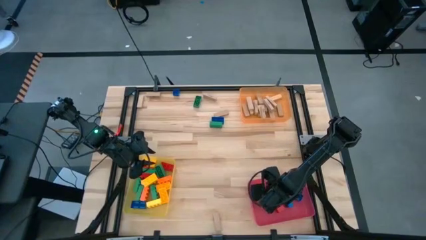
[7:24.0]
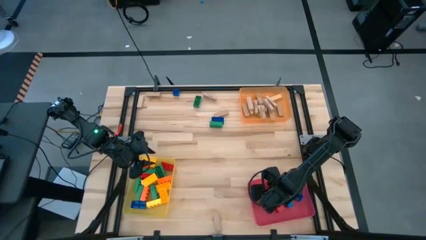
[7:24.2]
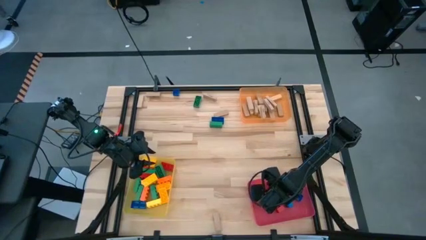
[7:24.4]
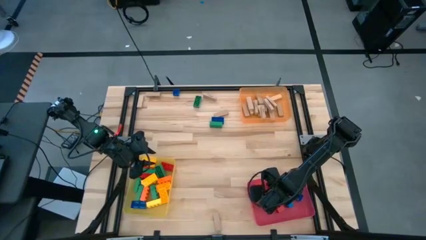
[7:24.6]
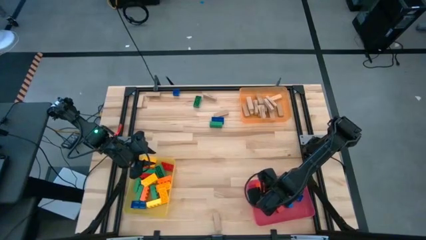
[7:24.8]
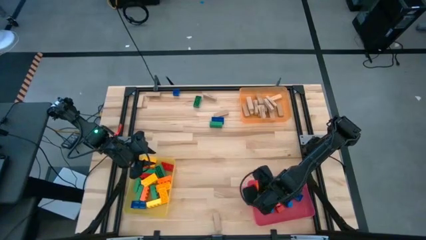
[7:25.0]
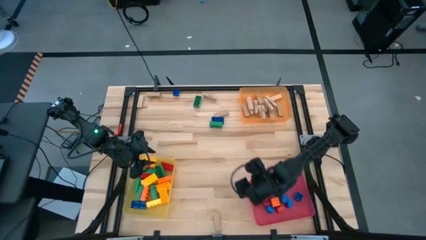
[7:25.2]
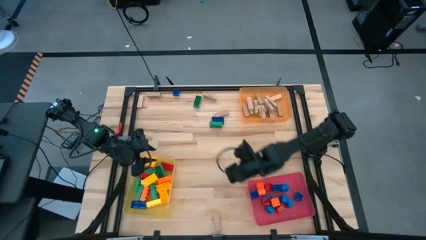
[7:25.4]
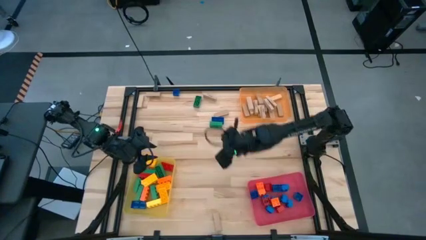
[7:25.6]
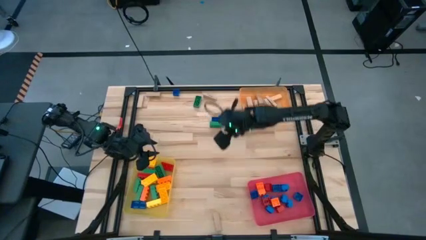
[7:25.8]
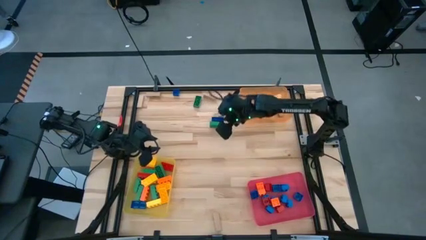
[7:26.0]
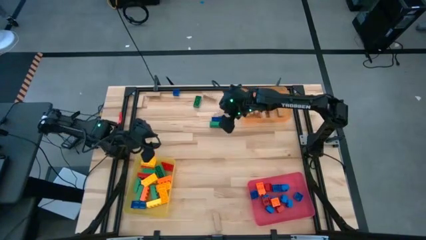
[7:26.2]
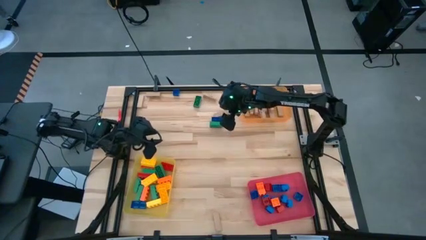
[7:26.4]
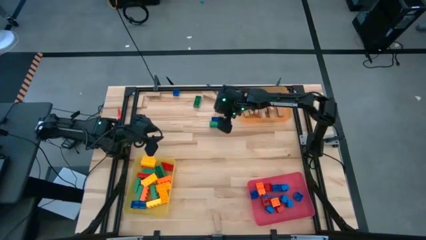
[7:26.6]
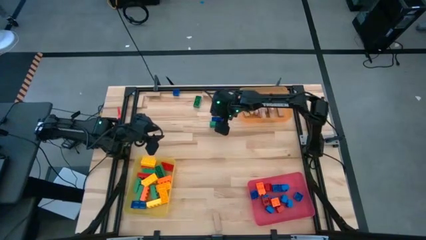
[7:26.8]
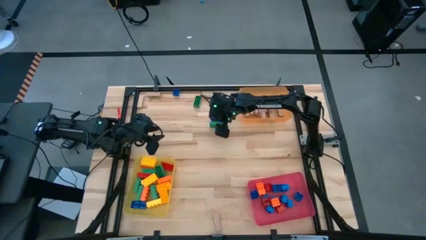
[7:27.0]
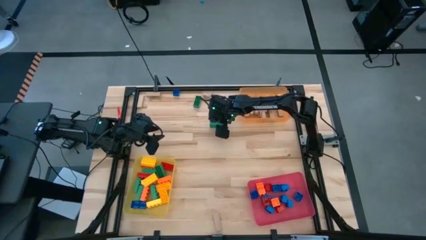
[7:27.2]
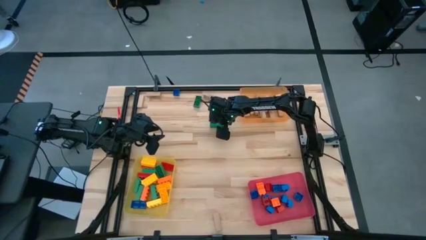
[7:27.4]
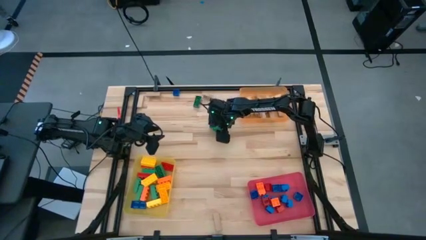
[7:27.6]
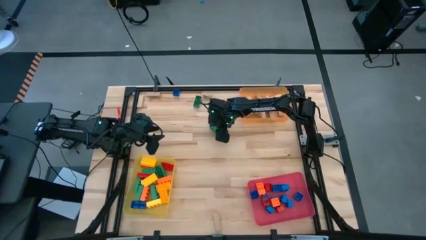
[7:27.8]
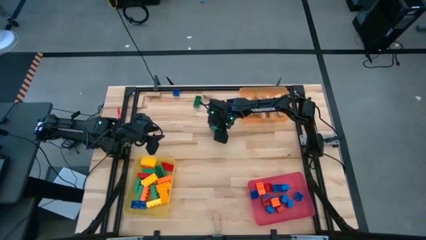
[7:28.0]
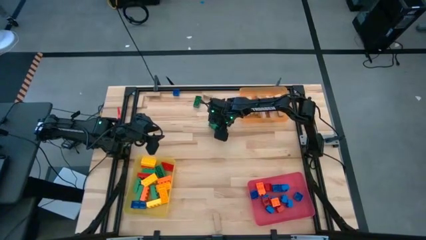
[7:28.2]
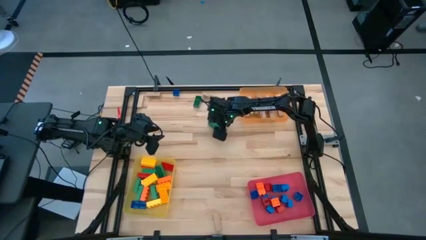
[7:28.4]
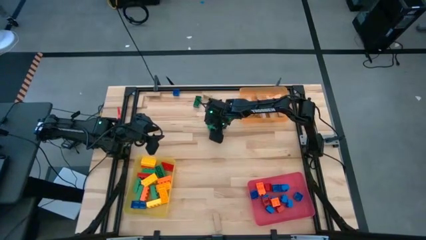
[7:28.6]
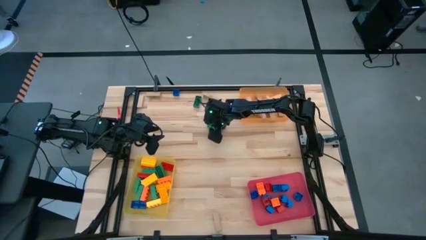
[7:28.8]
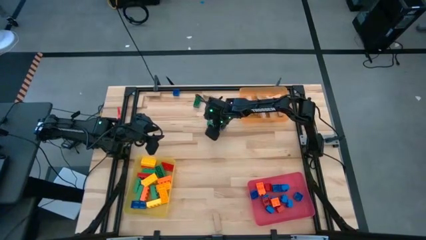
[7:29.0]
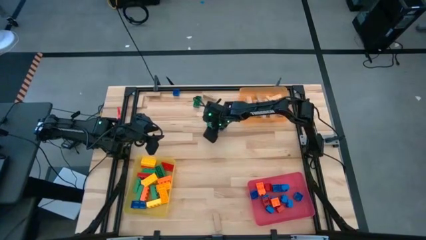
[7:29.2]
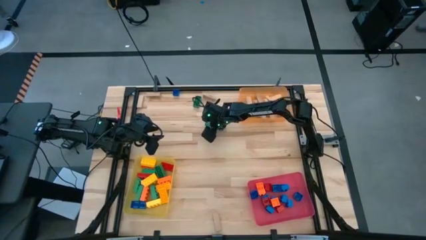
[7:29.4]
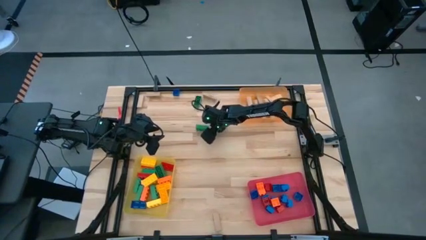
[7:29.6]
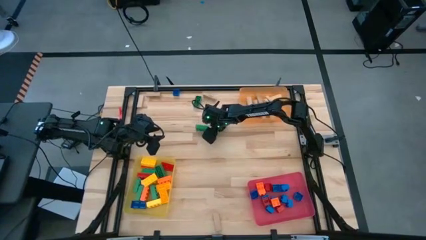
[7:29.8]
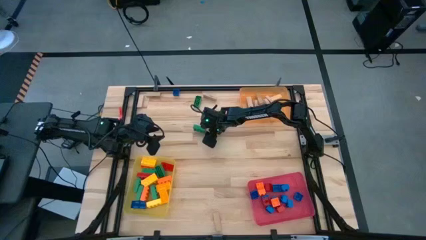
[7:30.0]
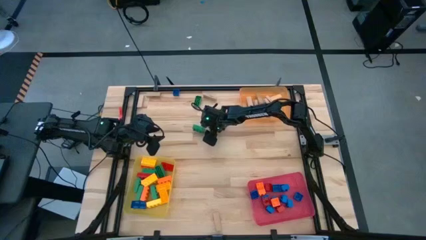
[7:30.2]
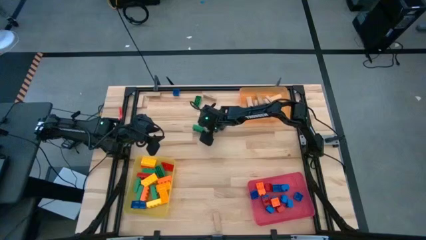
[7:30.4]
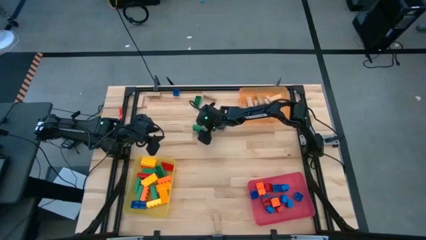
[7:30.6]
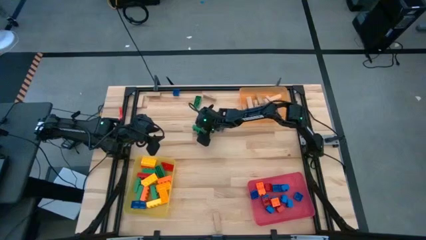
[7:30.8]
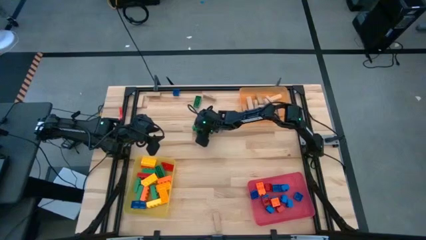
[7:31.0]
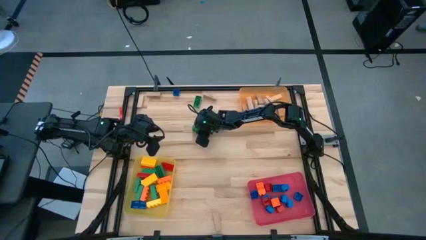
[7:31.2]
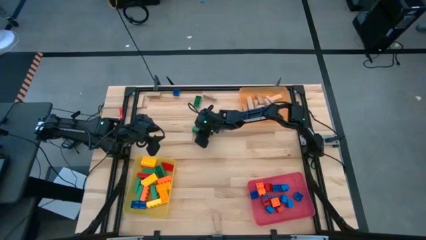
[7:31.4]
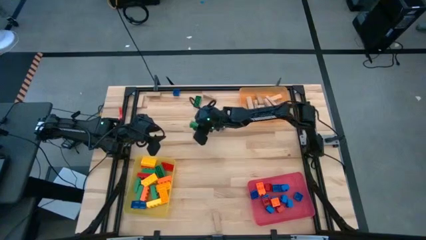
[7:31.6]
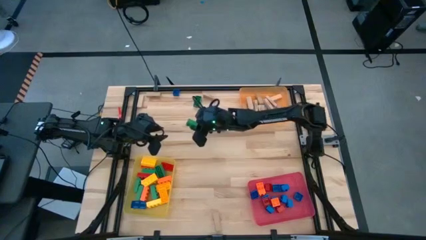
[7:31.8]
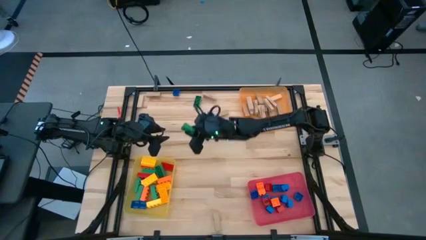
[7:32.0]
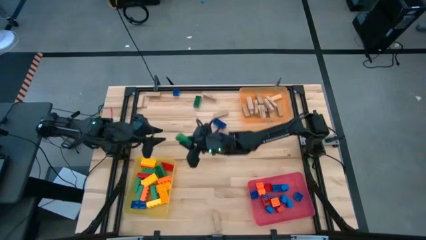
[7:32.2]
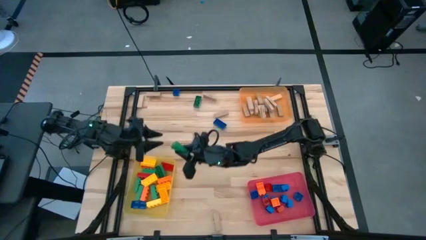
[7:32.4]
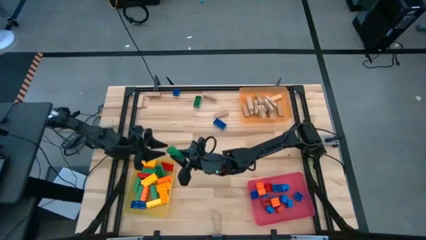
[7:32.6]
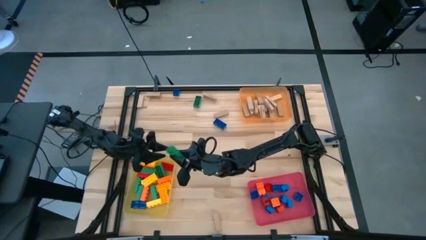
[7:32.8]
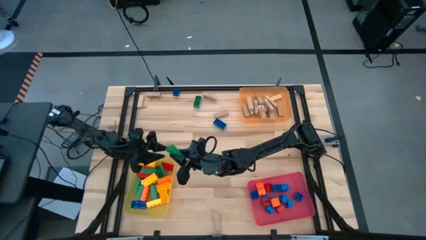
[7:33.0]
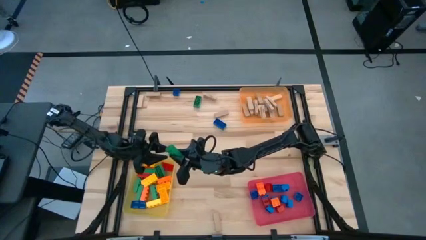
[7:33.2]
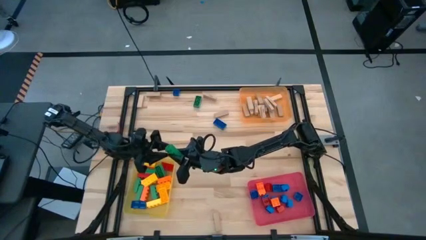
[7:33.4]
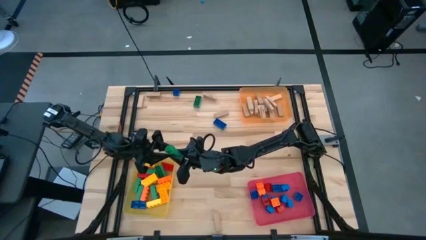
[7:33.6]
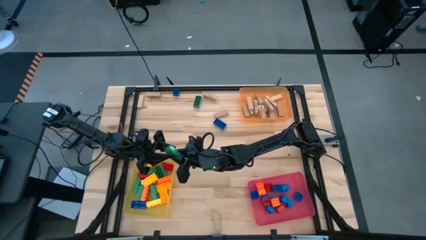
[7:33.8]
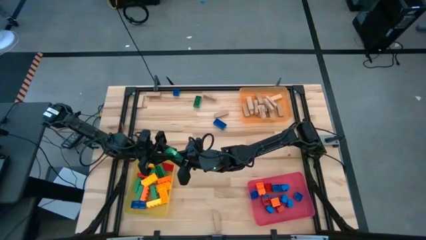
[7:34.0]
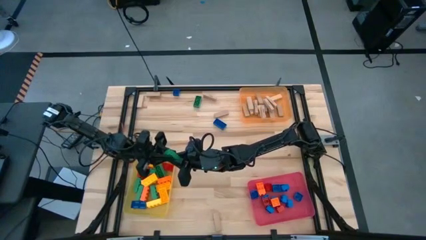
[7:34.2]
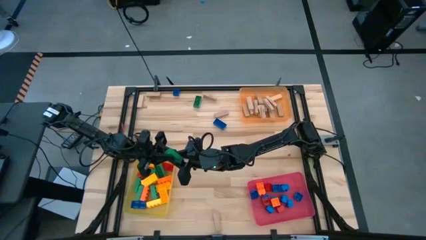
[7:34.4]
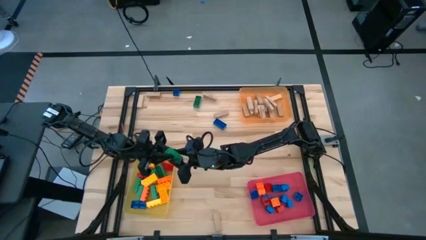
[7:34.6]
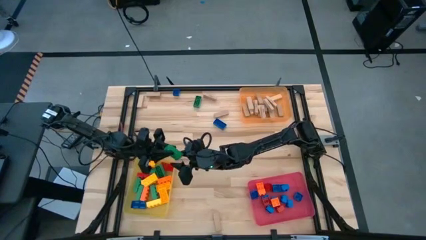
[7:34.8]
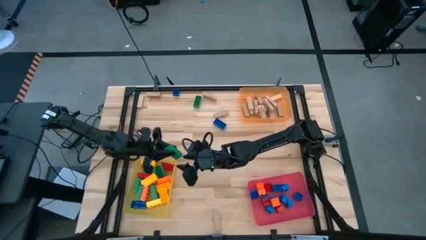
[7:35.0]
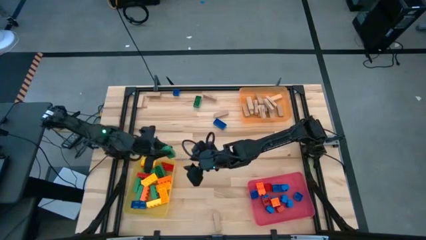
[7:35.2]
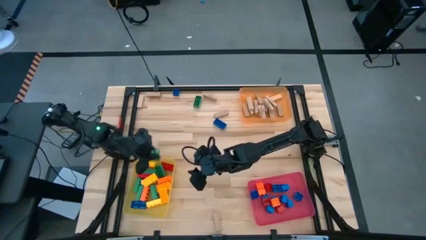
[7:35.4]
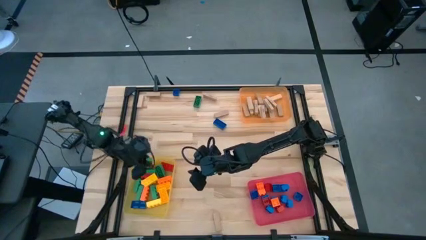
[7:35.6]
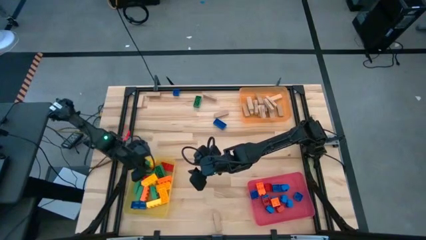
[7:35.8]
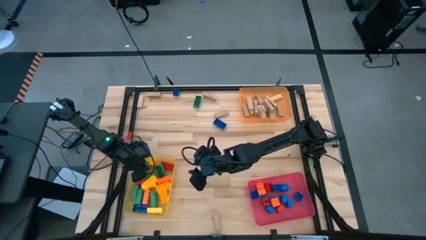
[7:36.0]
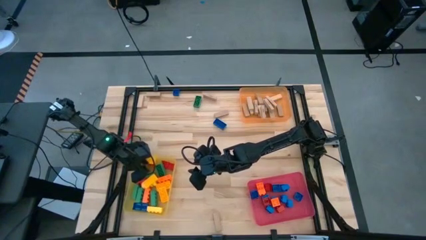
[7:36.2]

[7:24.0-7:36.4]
Task: Sort blocks by size
Put the large green piece into the yellow bin

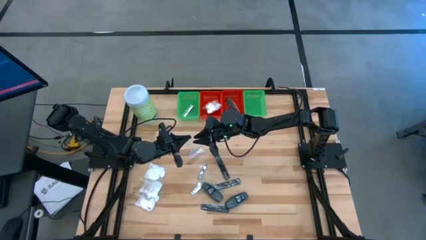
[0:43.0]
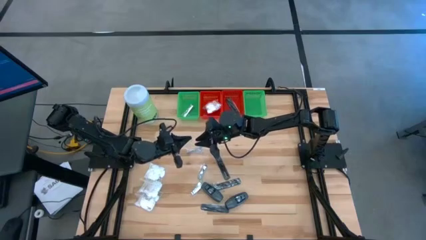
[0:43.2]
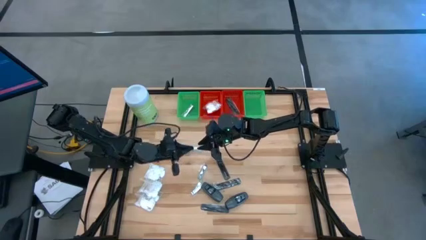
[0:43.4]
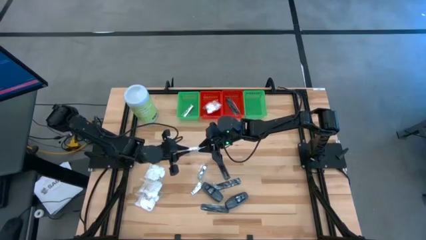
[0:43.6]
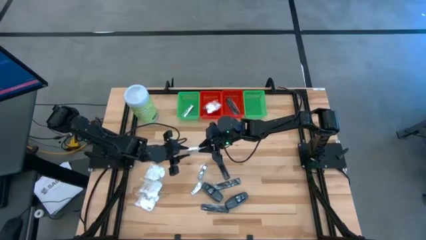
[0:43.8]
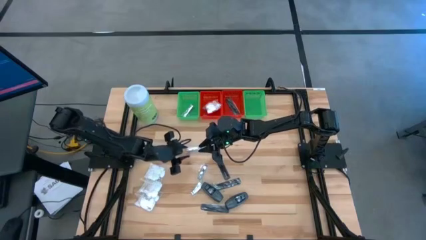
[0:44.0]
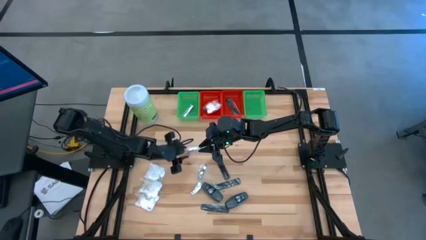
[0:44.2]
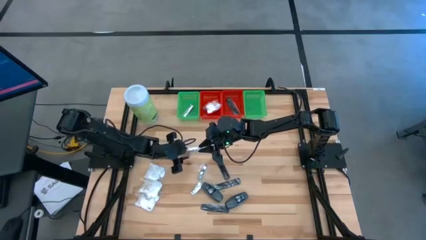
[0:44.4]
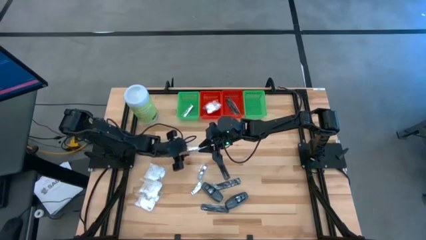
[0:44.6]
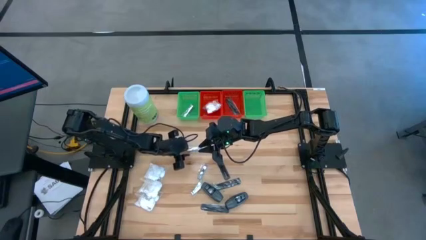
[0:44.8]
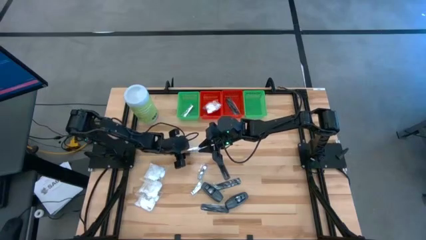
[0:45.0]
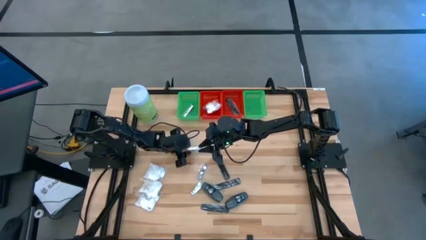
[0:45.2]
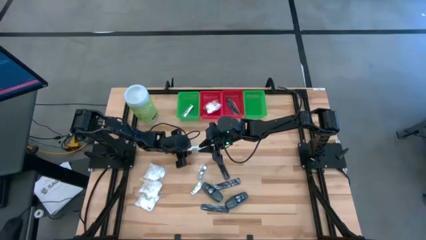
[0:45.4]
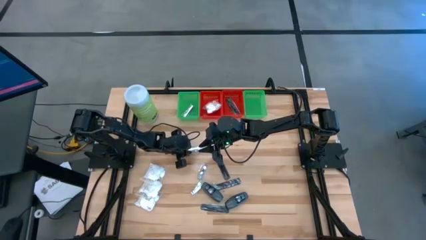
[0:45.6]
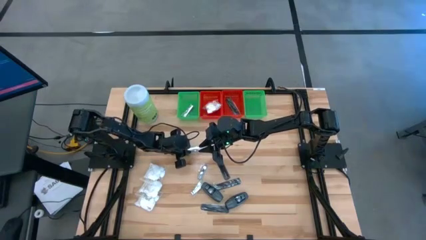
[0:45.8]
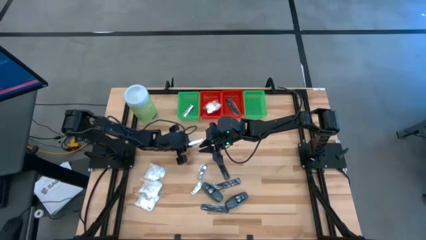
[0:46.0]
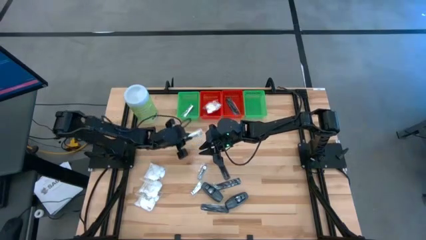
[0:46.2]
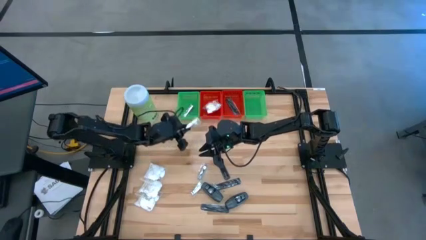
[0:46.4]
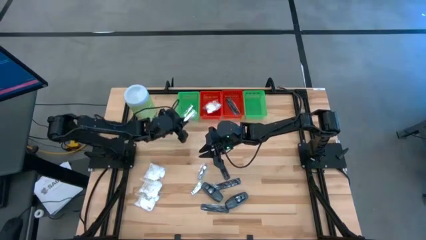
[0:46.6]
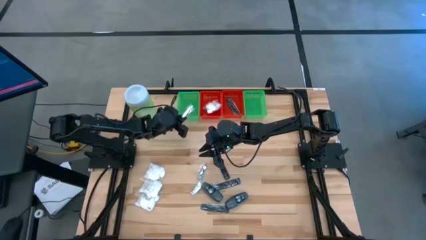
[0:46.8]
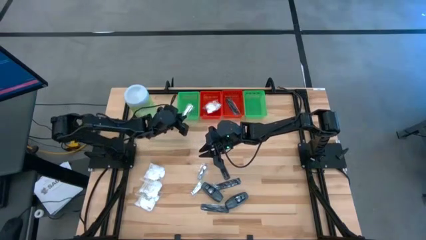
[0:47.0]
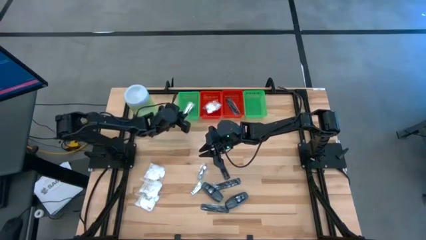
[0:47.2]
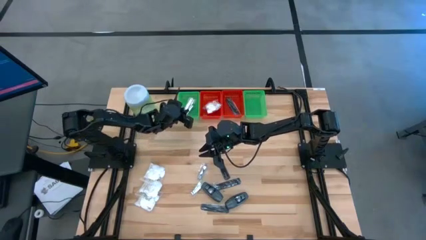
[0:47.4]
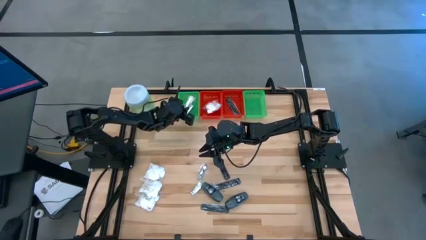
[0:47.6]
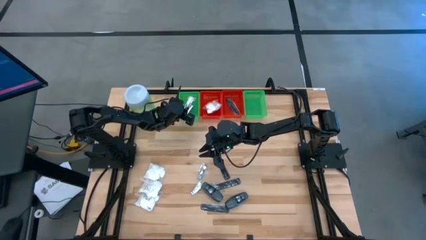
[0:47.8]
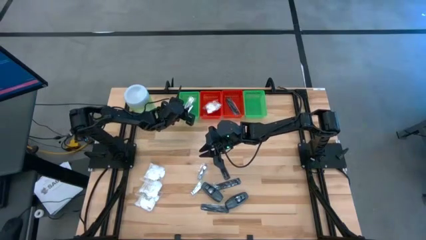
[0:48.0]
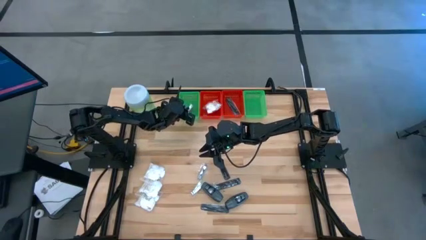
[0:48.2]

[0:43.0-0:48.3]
Task: Pick & Place Travel size toiletries
Put the silver nail cutter into the left green bin
